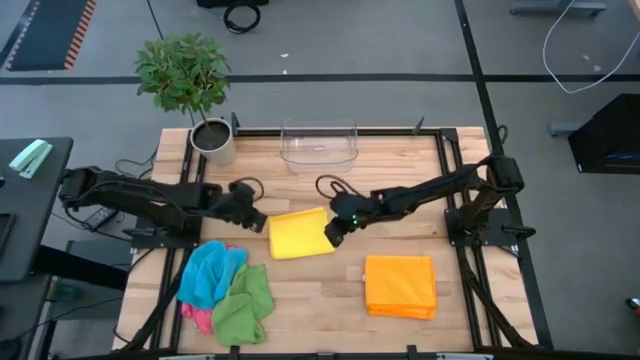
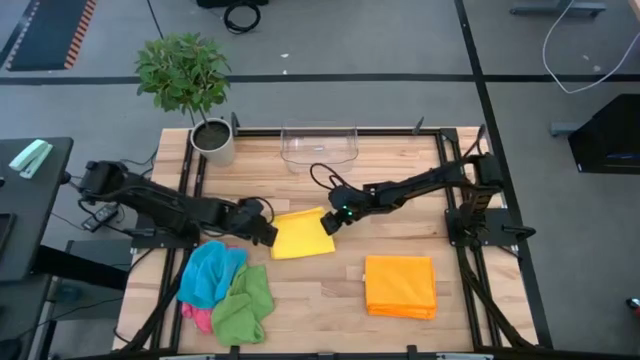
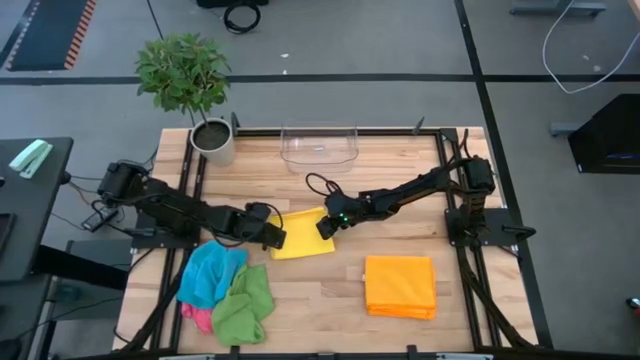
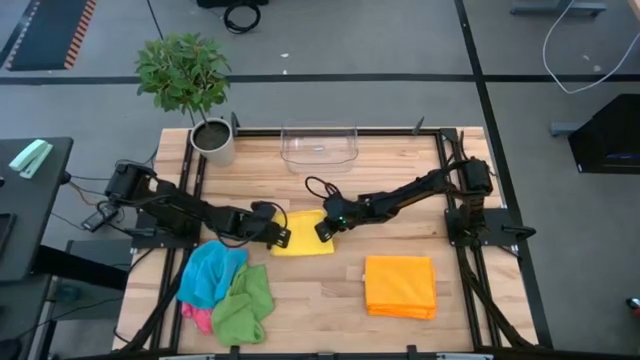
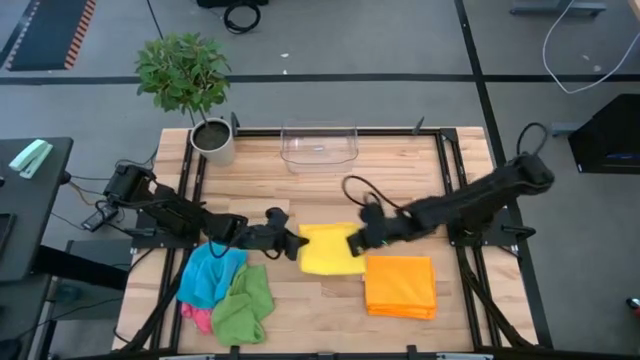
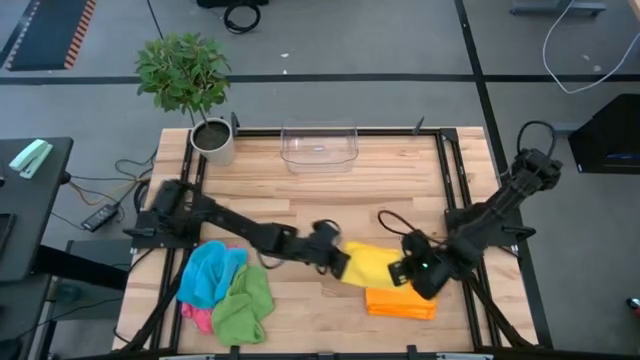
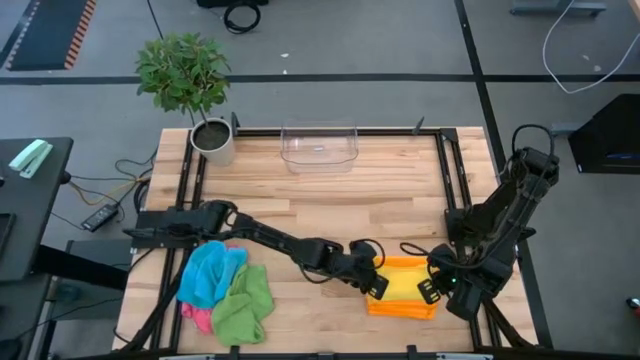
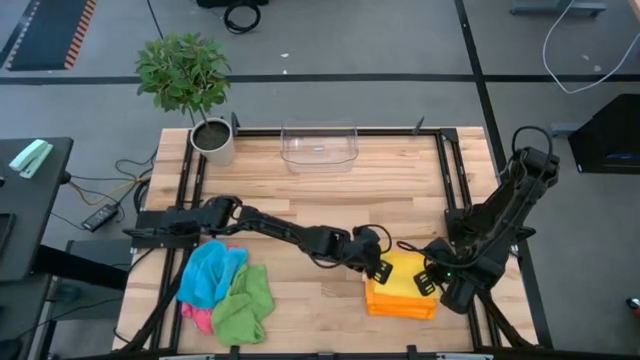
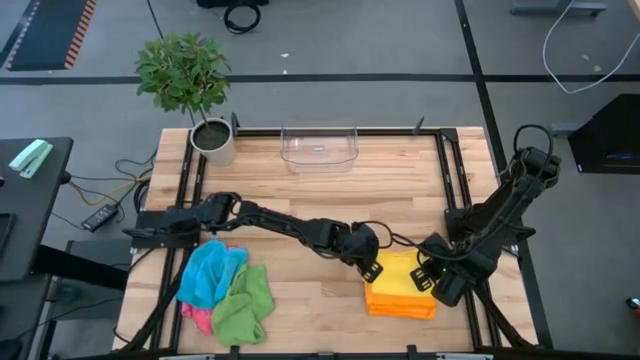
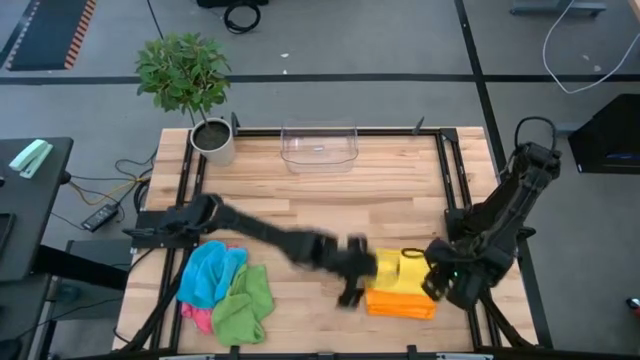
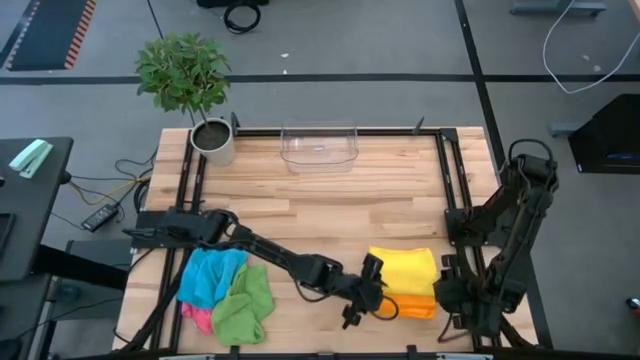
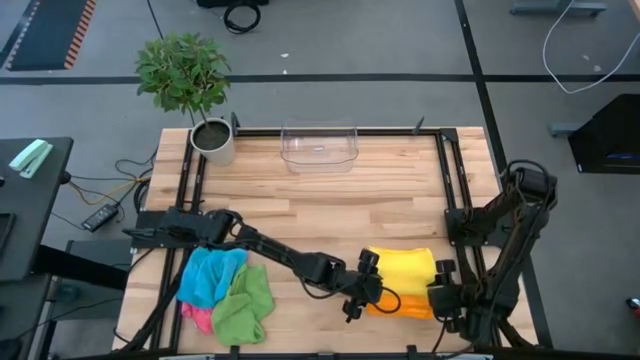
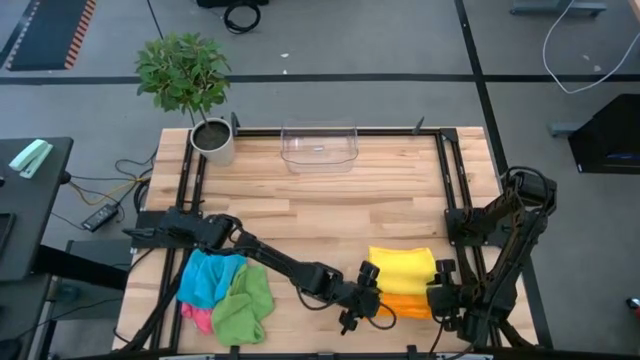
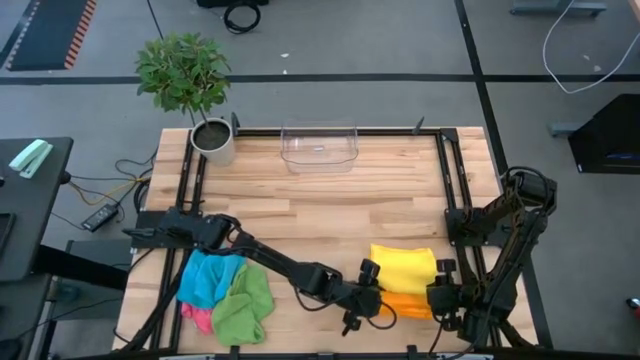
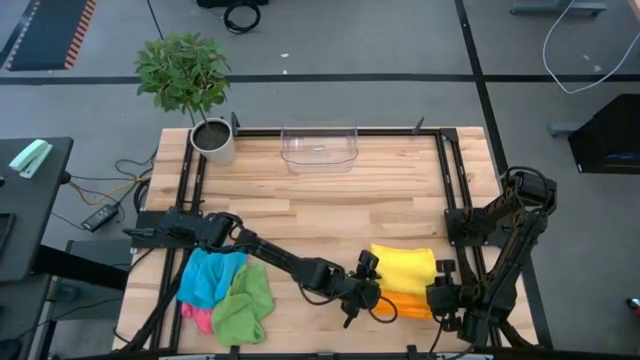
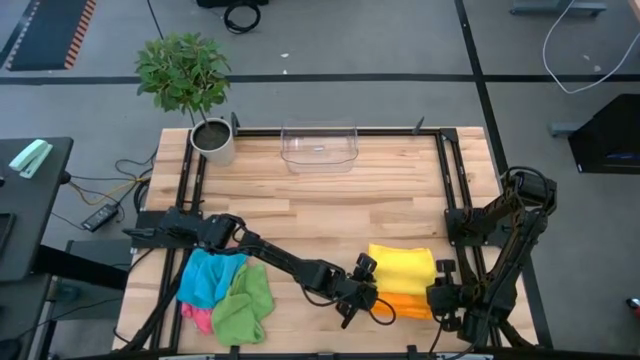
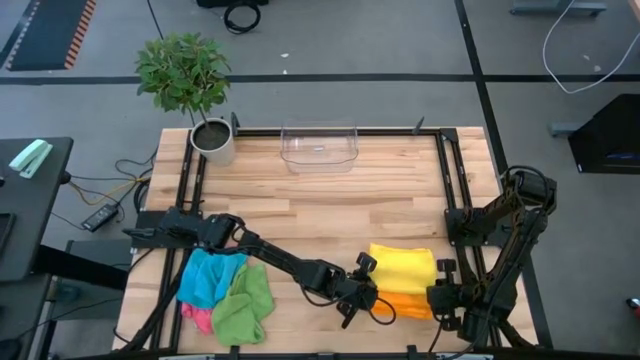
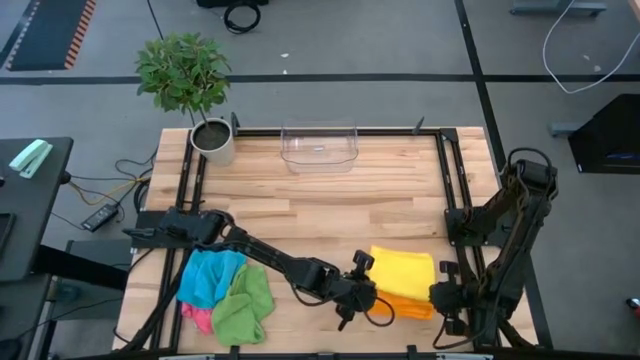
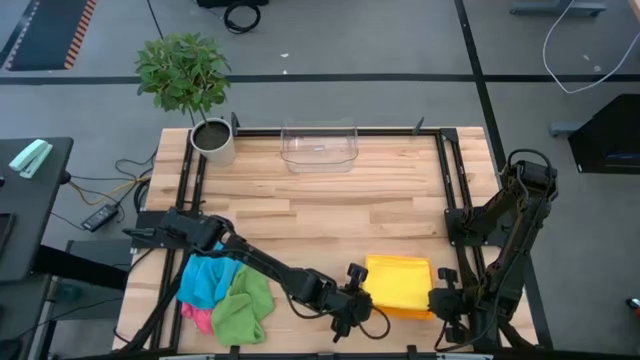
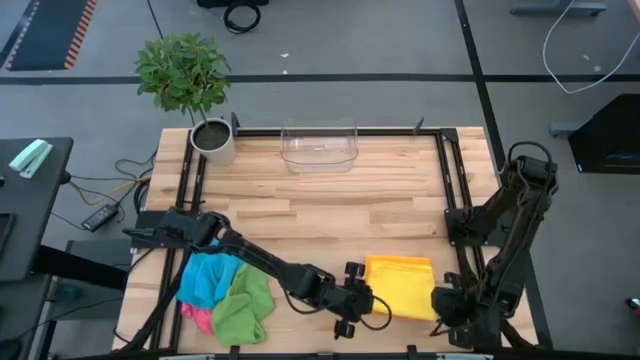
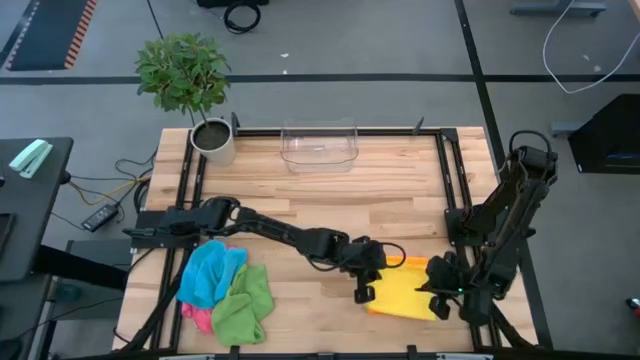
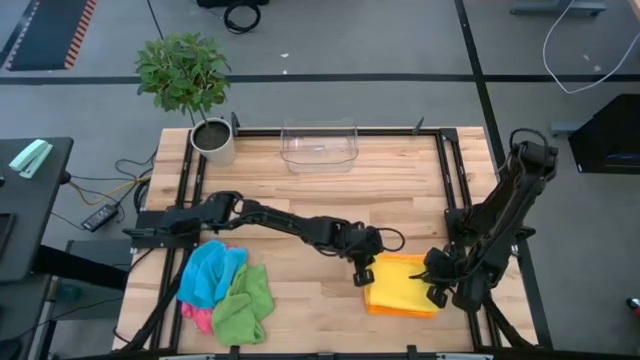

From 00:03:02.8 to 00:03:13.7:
Task: Fold microfiber towels
Stack the yellow towel on the orange towel

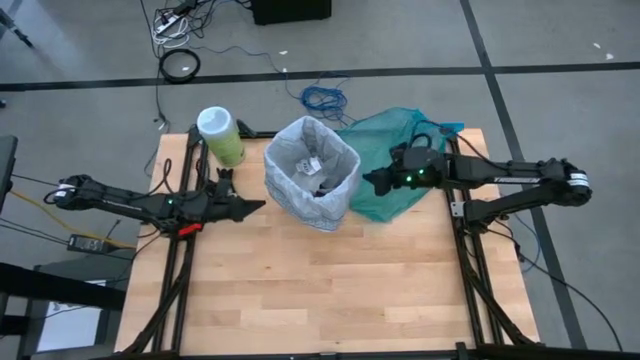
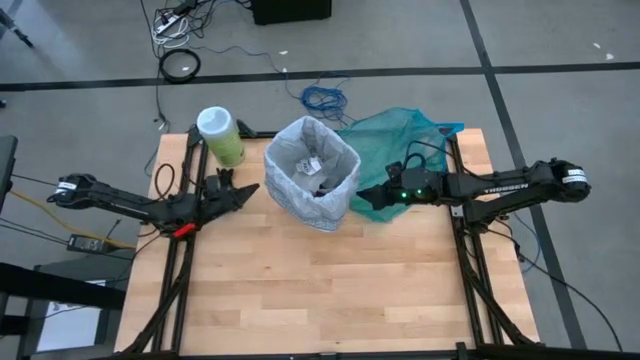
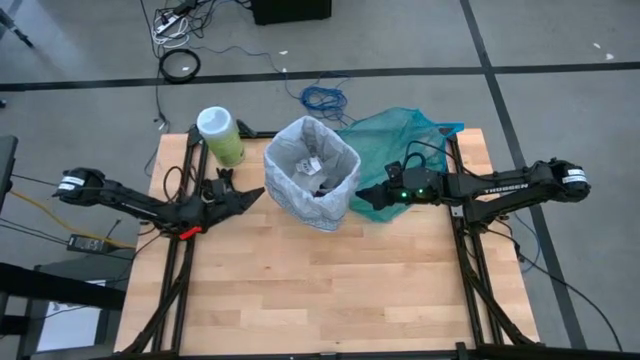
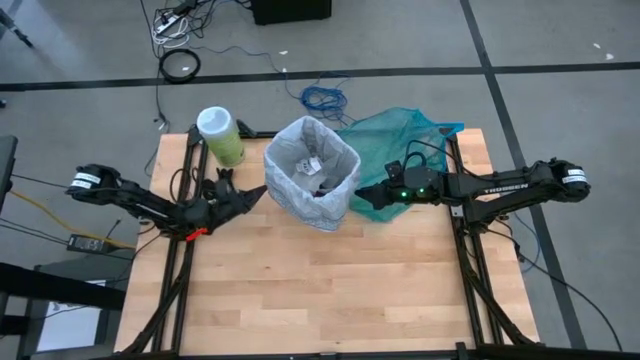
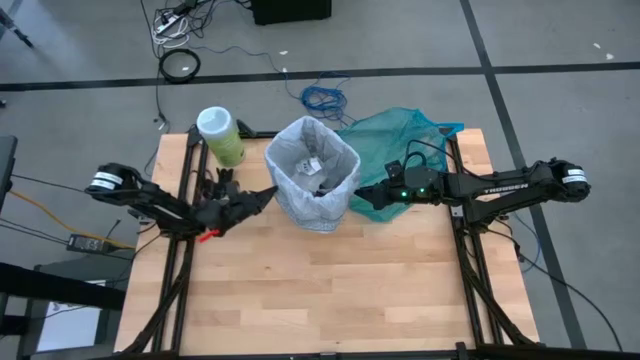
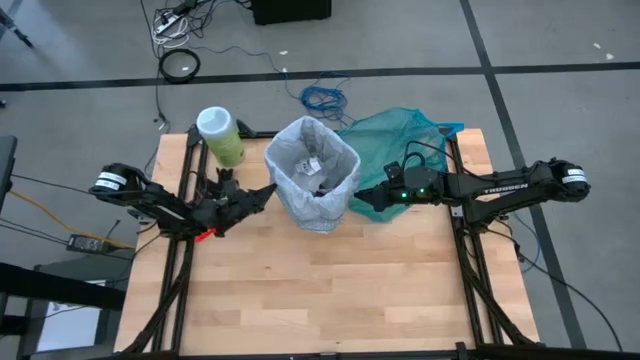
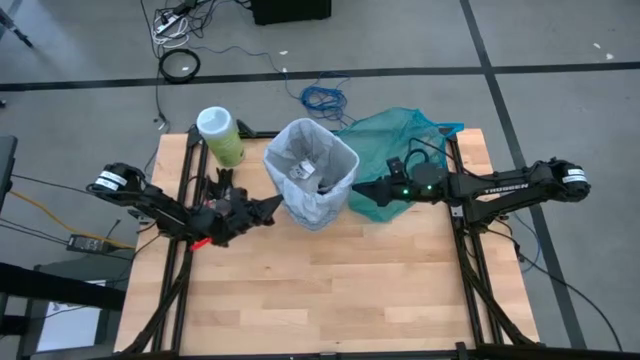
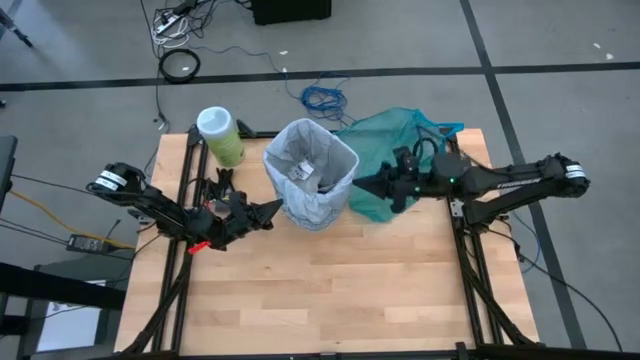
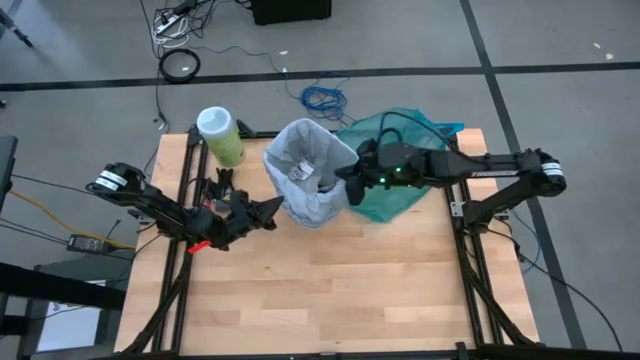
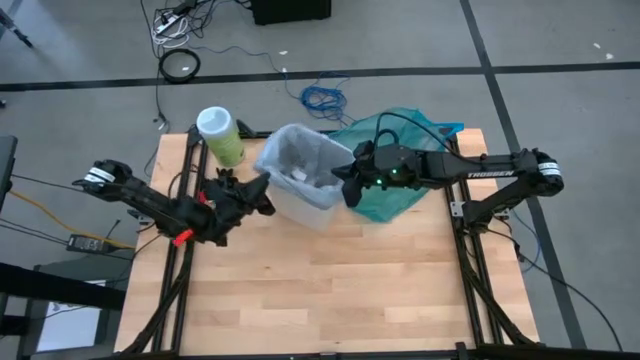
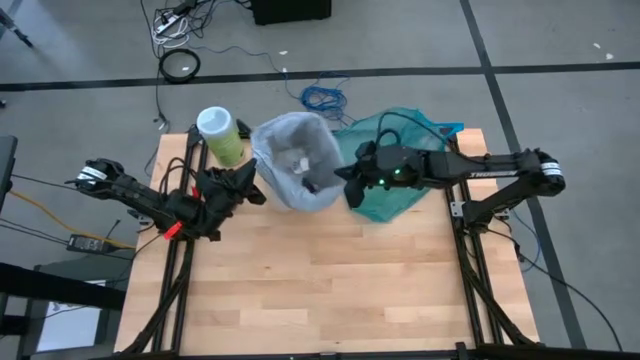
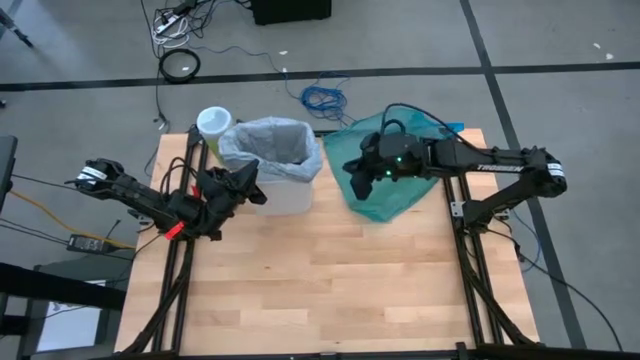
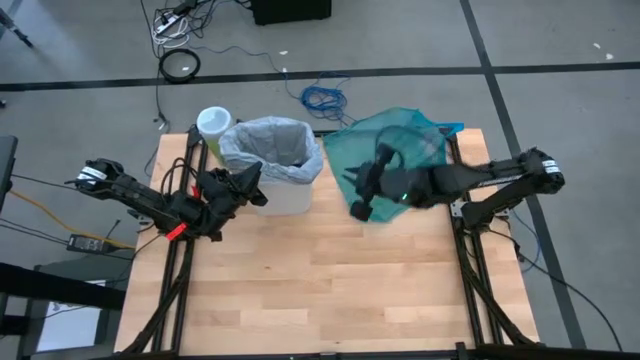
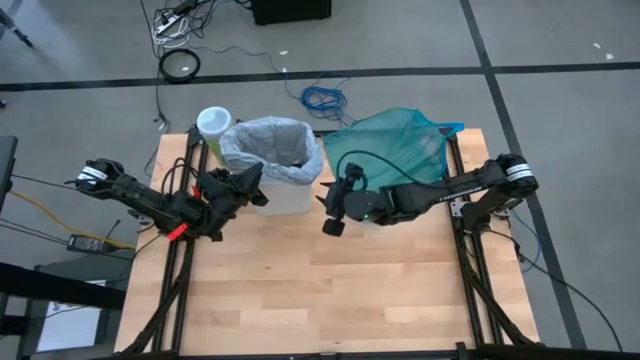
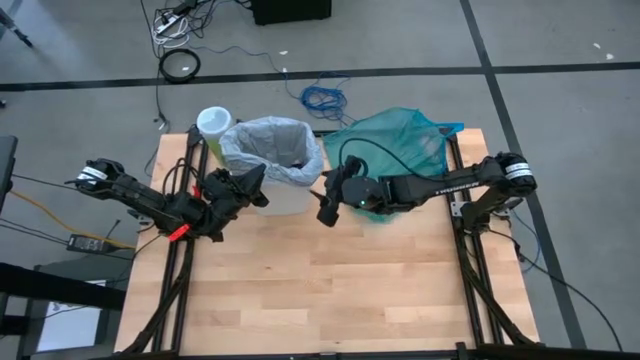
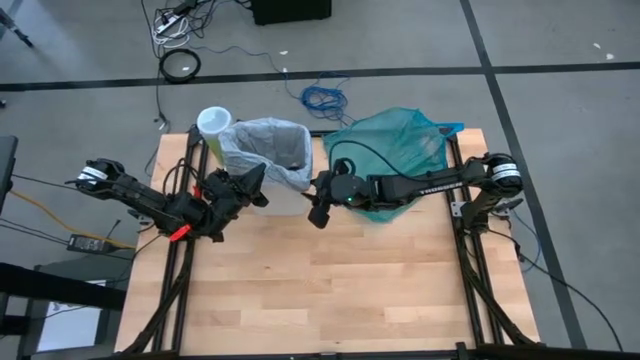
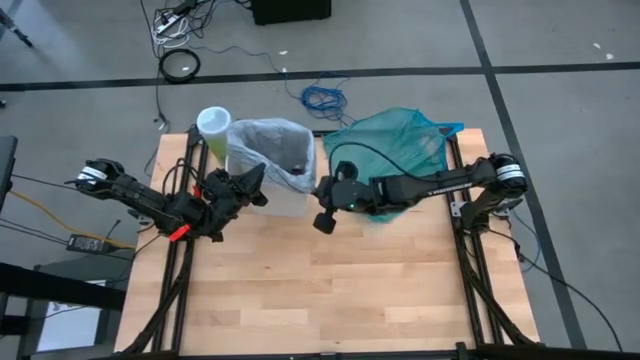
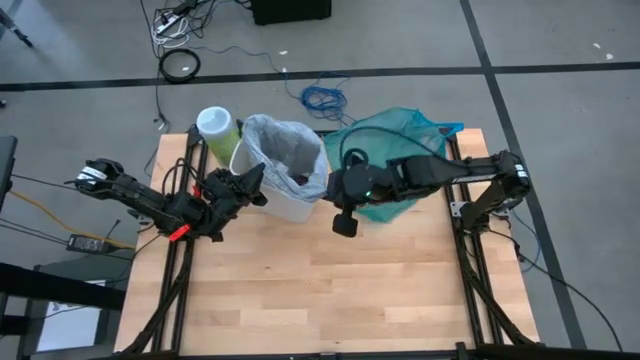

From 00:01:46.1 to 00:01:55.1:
Task: place trash/remove bag and relplace
Remove the light blue trash bag from the trash bin

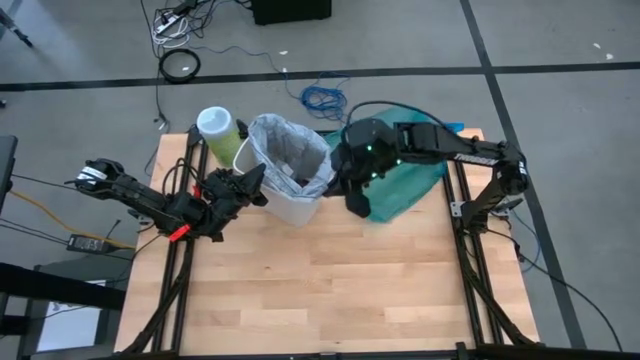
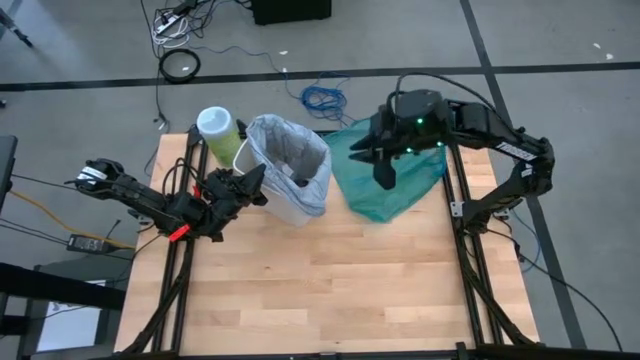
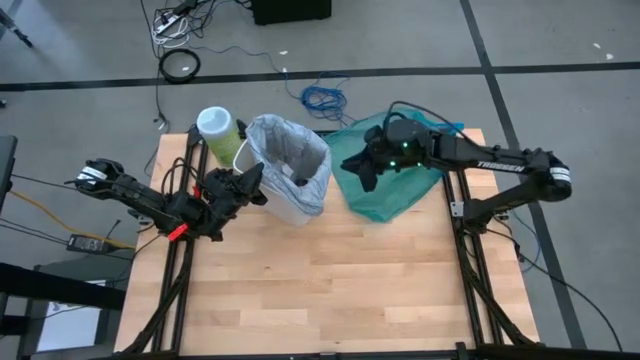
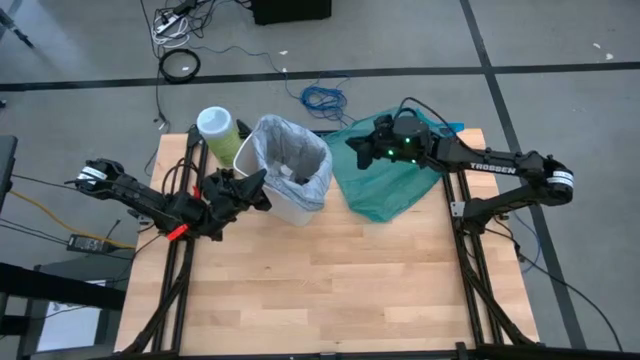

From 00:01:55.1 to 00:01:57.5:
Remove the light blue trash bag from the trash bin
